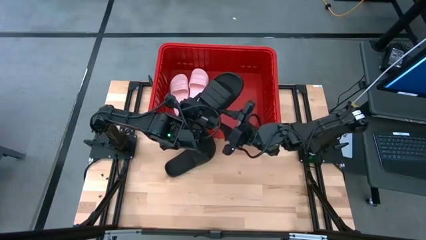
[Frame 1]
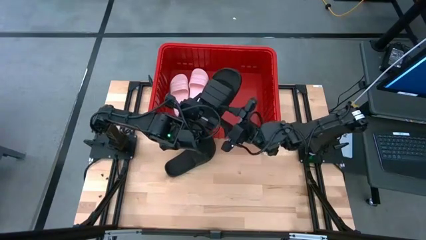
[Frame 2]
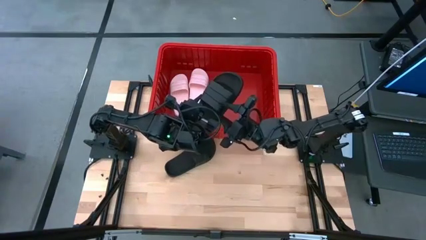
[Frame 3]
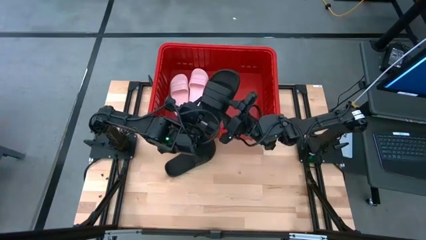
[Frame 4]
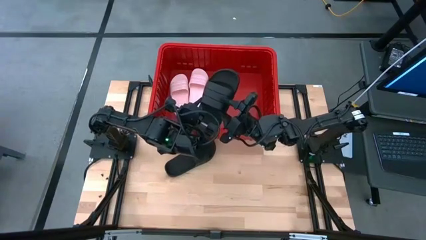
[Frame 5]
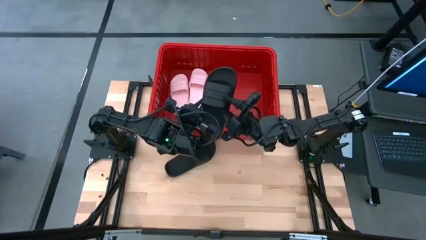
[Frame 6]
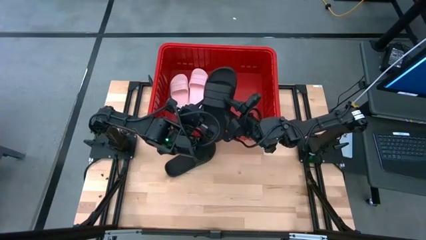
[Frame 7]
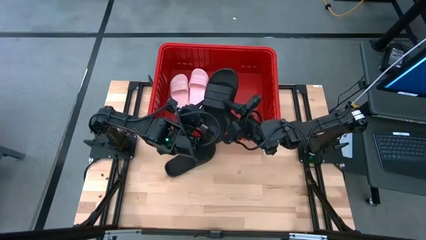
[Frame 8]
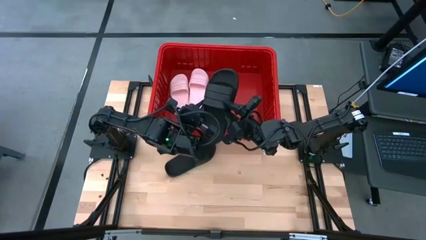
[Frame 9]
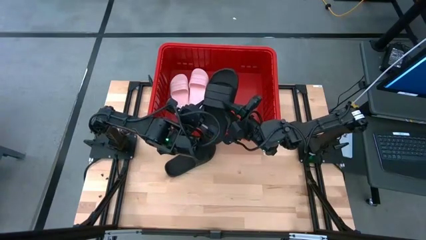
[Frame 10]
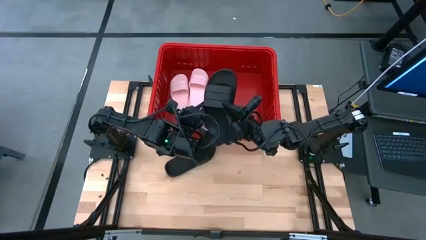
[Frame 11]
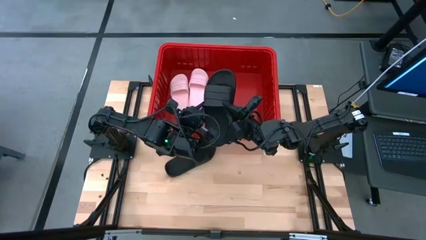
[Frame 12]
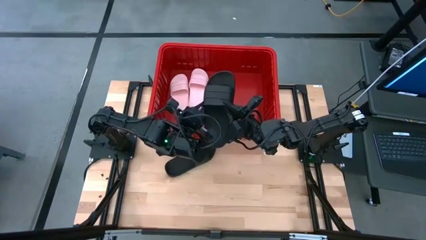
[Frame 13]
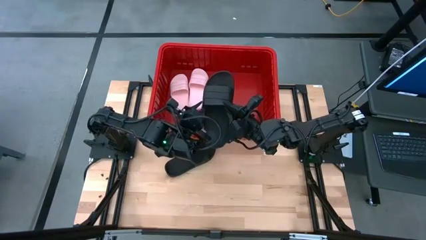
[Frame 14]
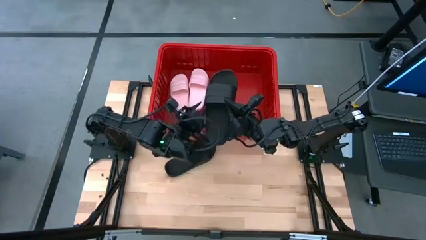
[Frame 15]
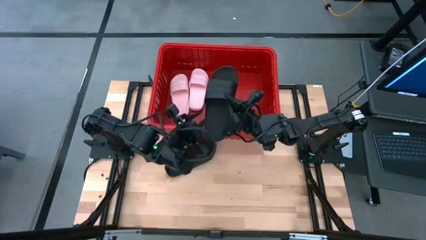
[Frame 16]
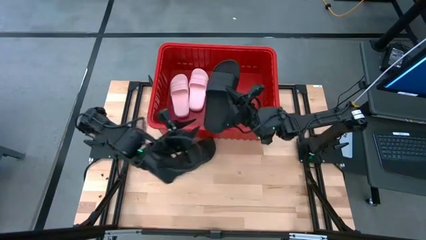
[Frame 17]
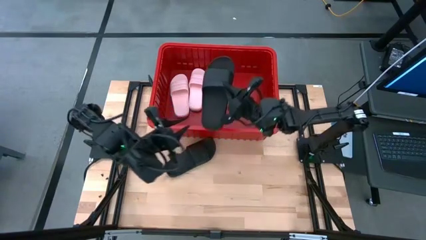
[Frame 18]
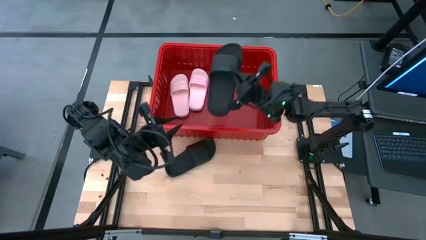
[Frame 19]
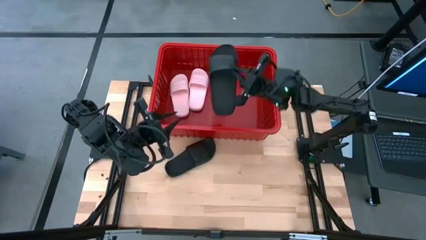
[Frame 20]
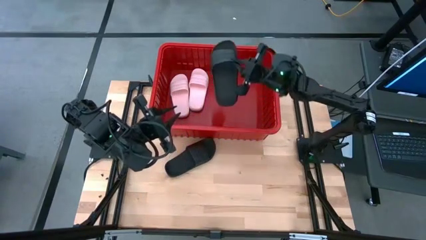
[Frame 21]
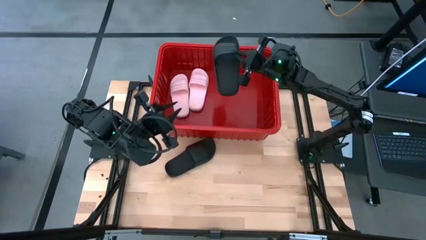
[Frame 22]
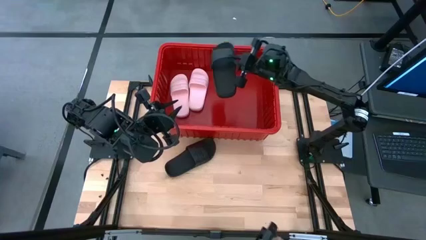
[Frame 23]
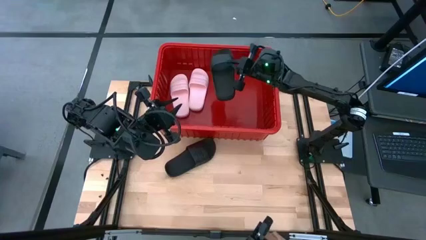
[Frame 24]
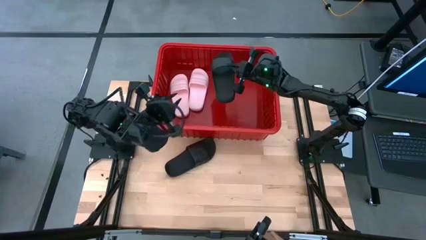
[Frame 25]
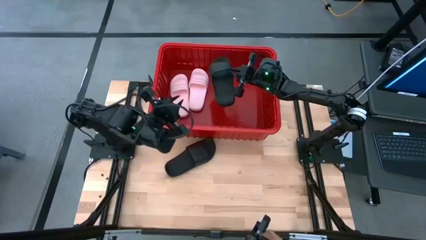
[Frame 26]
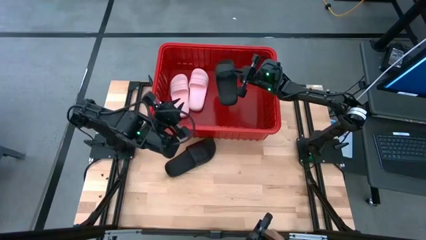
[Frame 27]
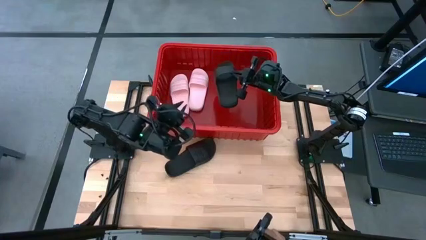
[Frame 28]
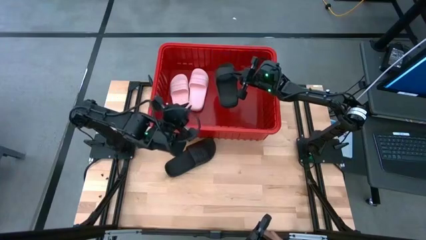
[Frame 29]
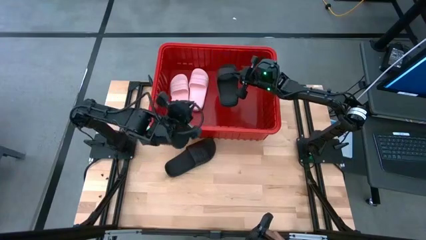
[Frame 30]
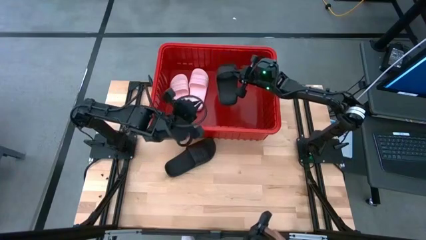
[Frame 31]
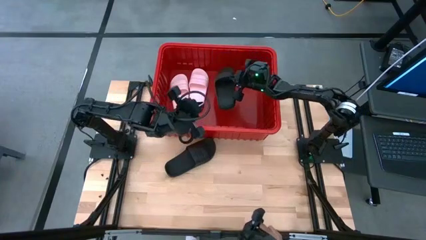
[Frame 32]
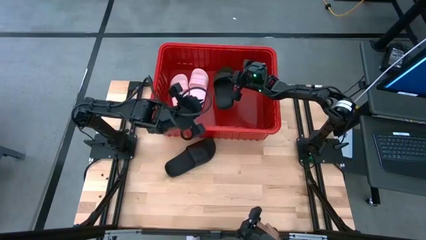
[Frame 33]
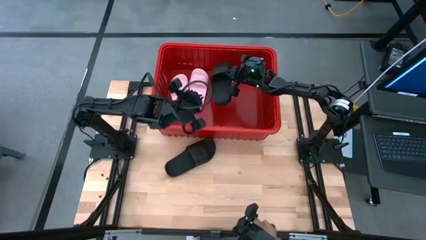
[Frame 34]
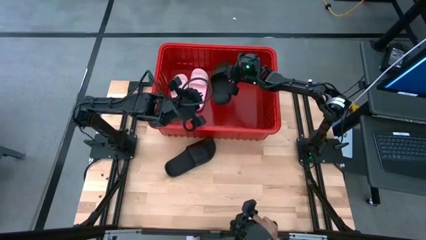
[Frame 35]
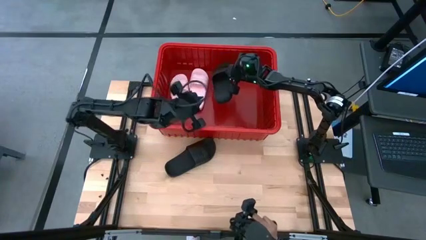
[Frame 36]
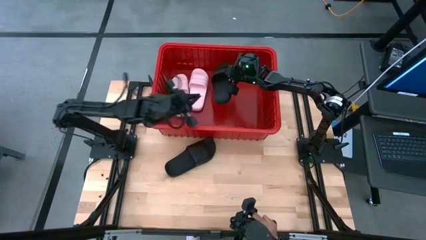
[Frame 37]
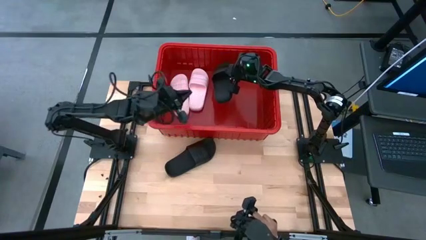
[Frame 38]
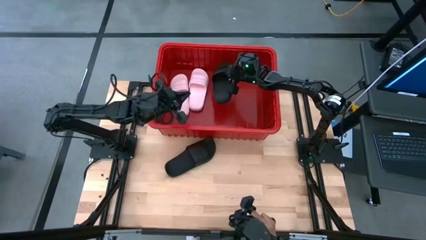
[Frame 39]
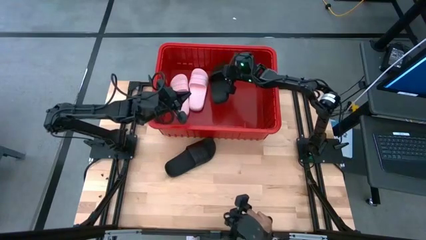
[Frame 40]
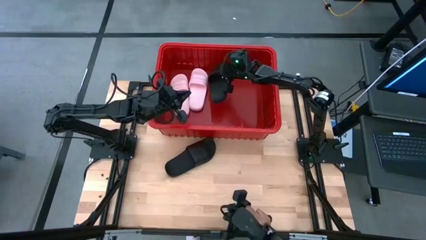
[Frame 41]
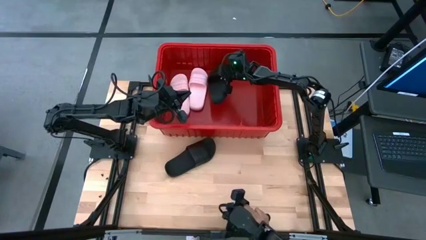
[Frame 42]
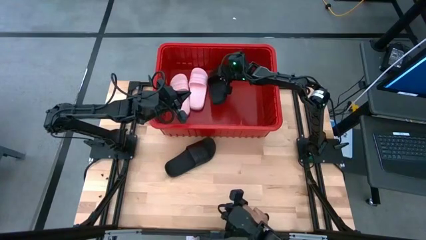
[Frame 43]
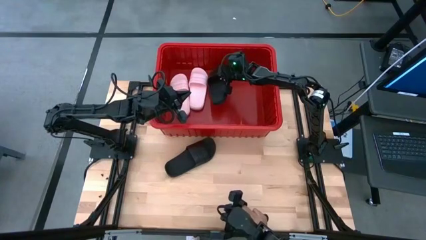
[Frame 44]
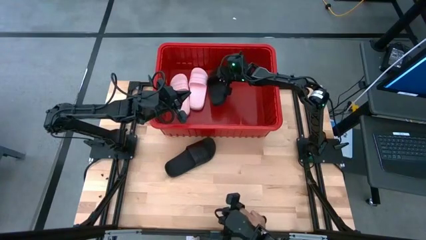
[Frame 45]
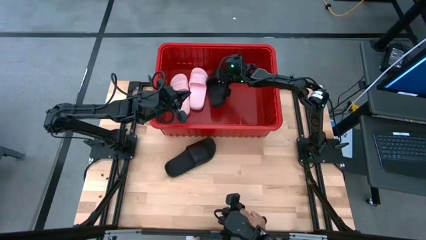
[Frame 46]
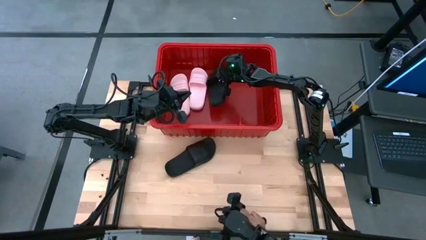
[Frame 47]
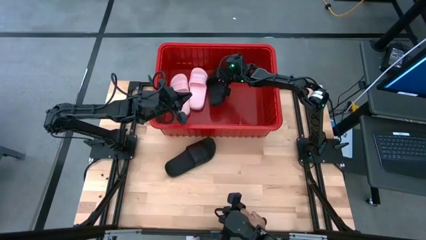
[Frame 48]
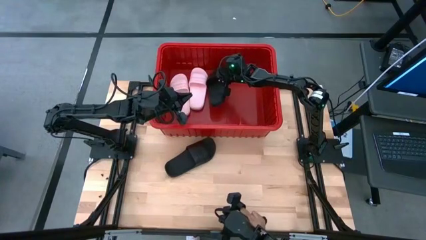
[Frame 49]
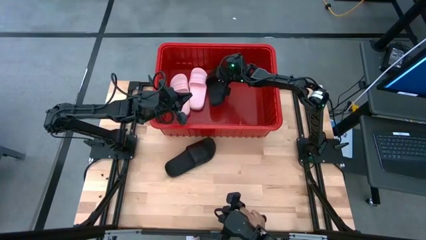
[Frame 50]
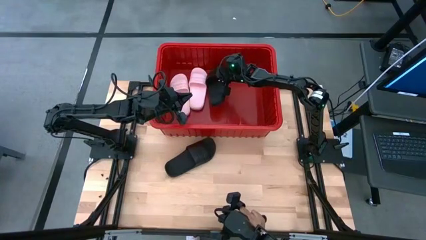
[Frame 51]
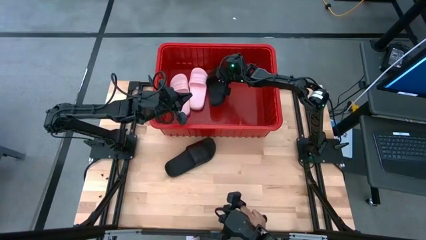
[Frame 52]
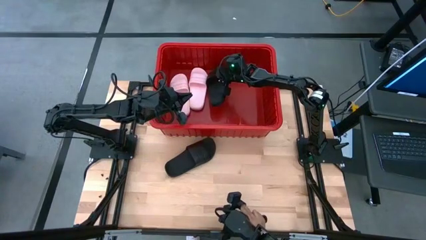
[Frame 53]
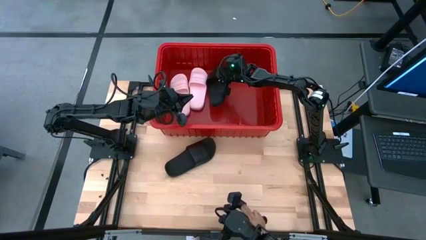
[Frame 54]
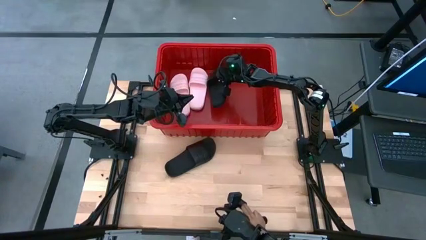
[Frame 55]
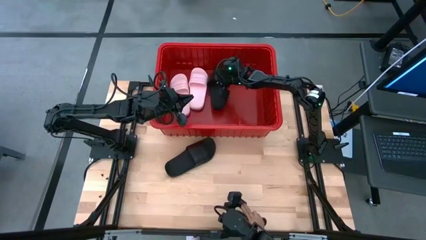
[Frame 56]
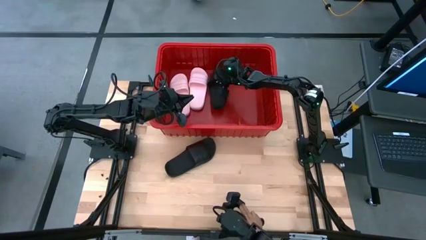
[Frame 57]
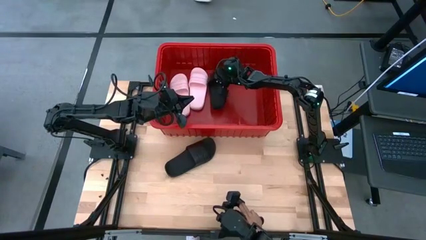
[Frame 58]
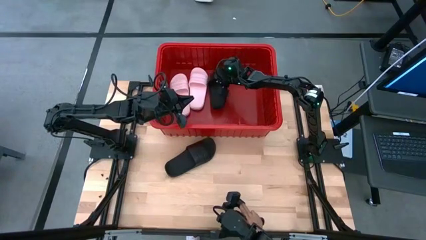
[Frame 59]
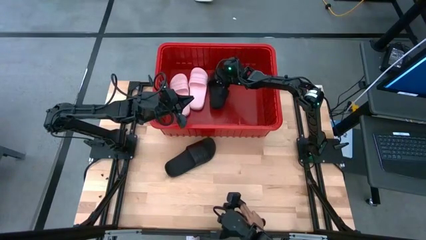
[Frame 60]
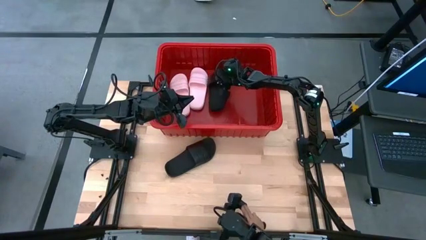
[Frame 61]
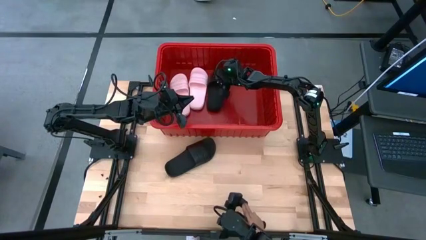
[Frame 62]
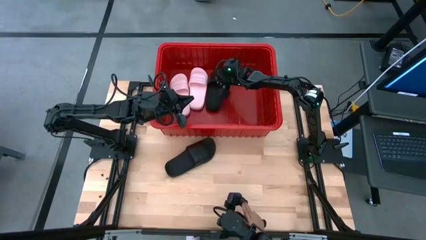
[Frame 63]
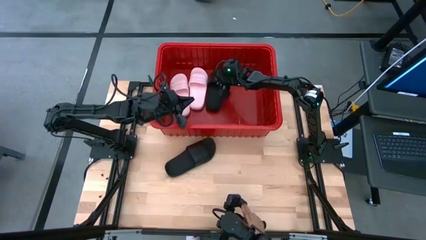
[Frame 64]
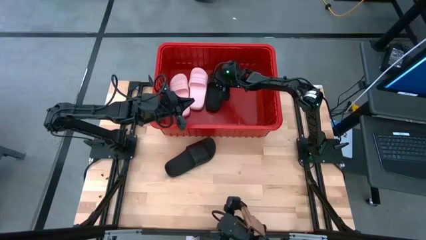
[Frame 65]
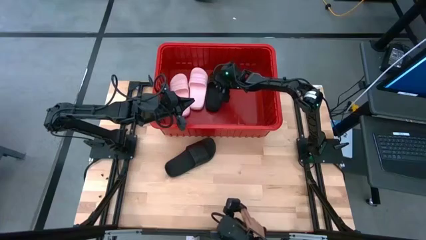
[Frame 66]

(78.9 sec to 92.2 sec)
Task: Pick and place slides into bin
Put the bottom black slide into the red bin
